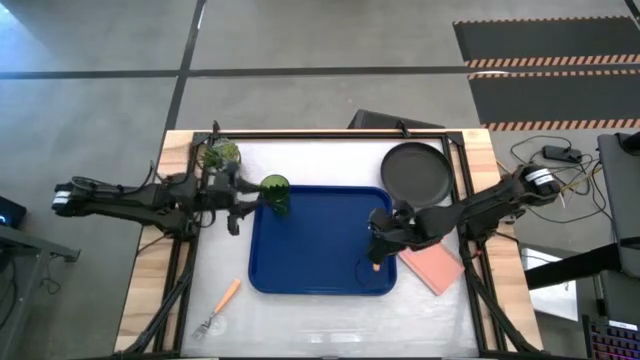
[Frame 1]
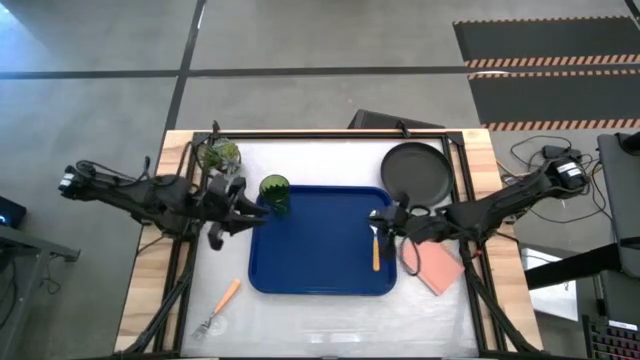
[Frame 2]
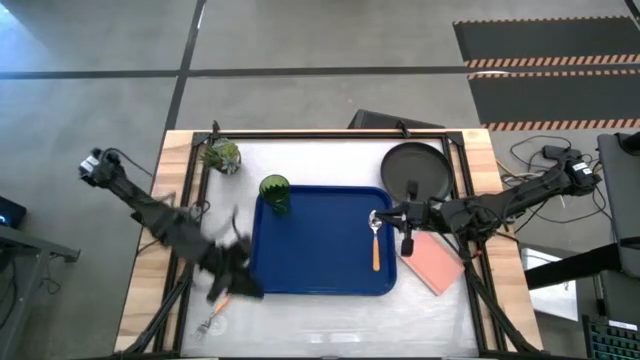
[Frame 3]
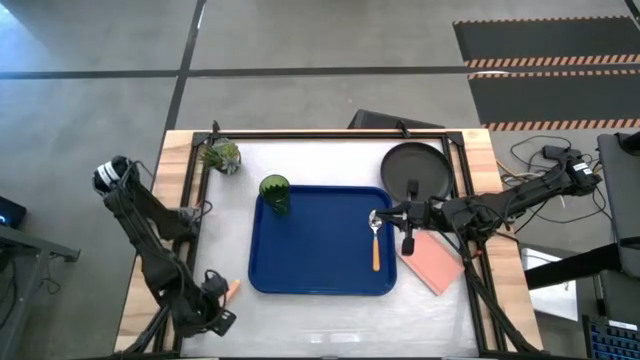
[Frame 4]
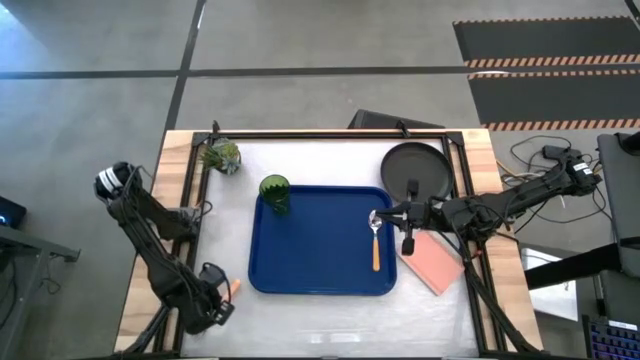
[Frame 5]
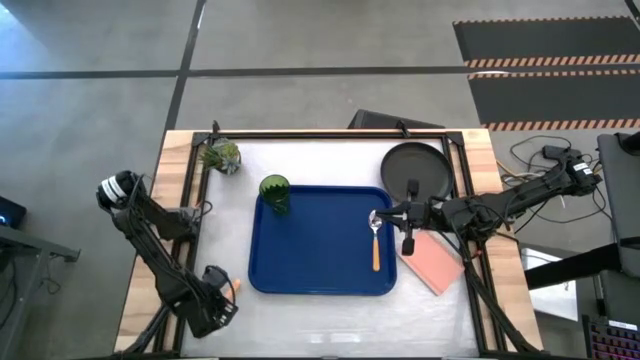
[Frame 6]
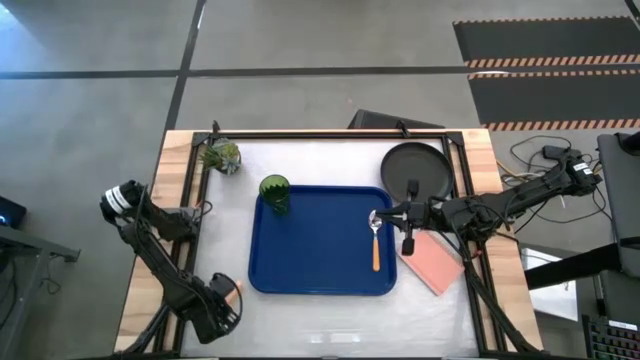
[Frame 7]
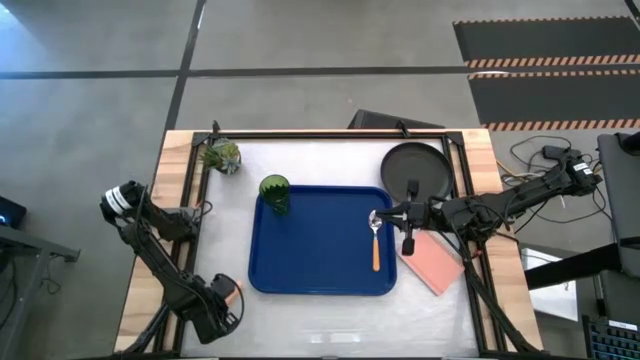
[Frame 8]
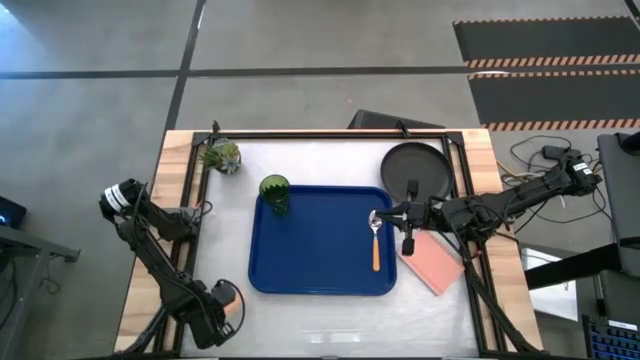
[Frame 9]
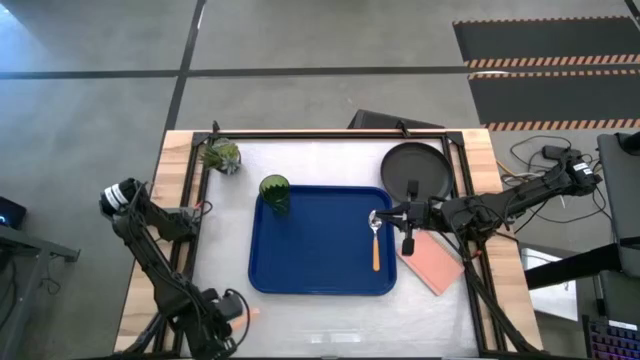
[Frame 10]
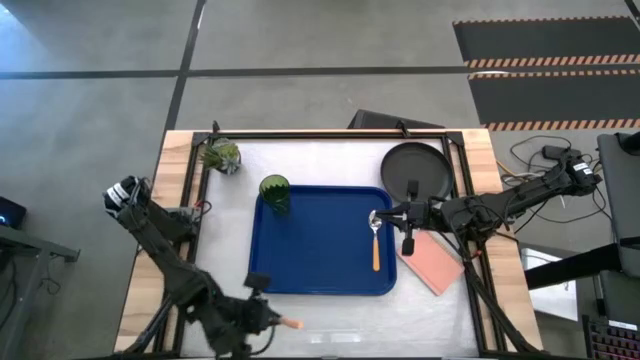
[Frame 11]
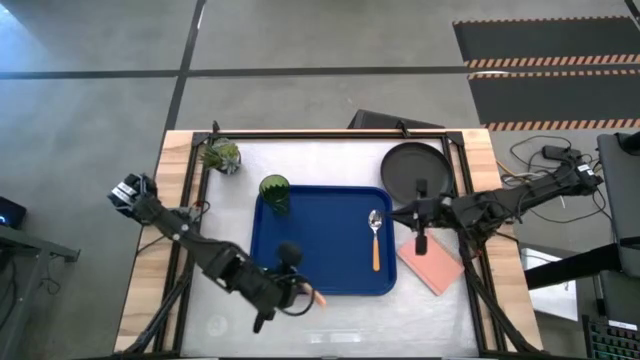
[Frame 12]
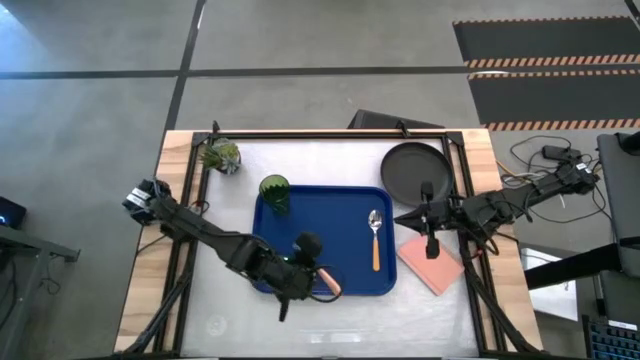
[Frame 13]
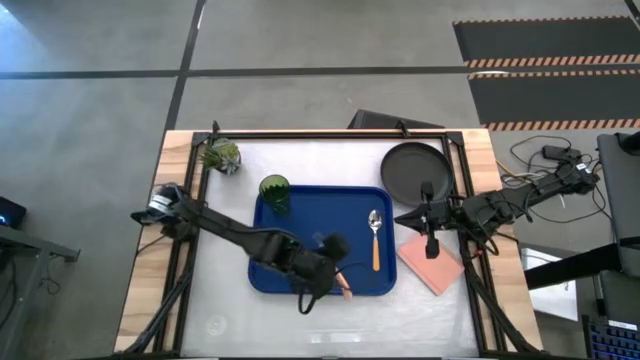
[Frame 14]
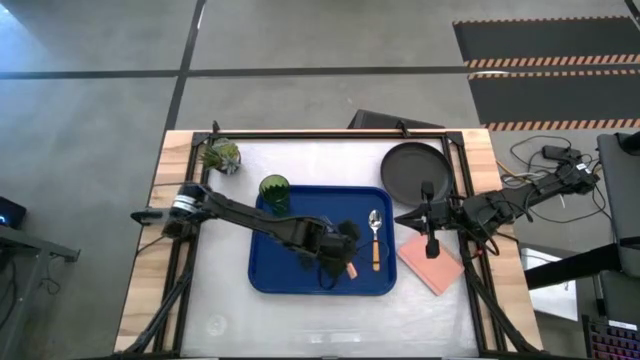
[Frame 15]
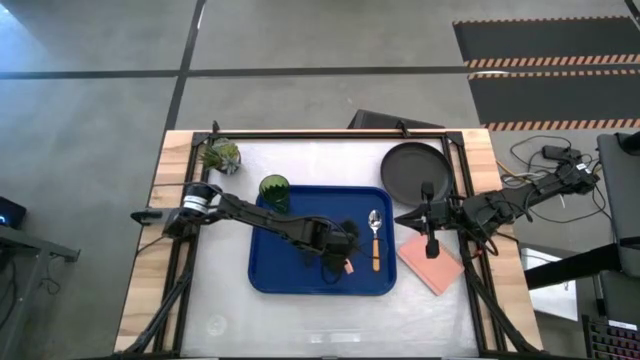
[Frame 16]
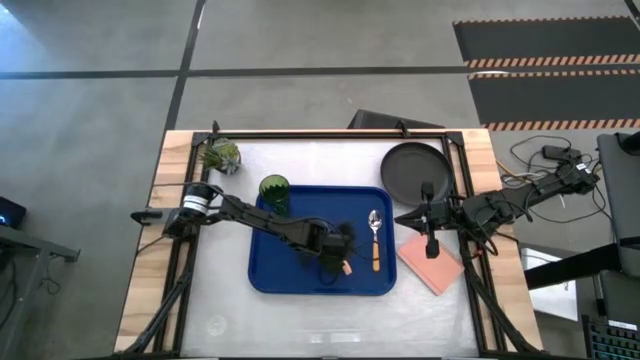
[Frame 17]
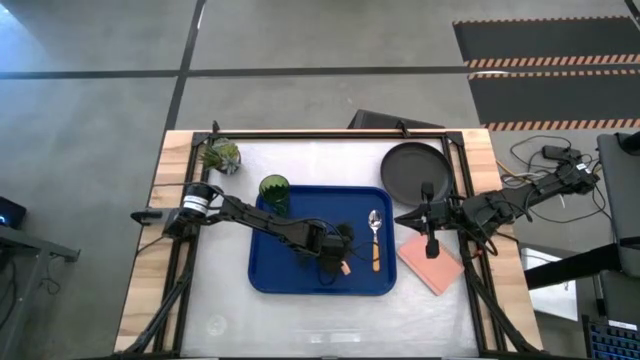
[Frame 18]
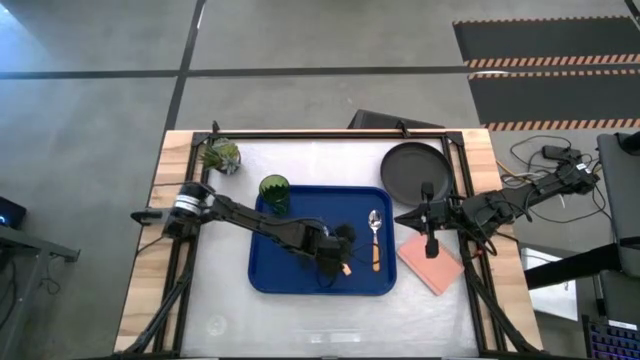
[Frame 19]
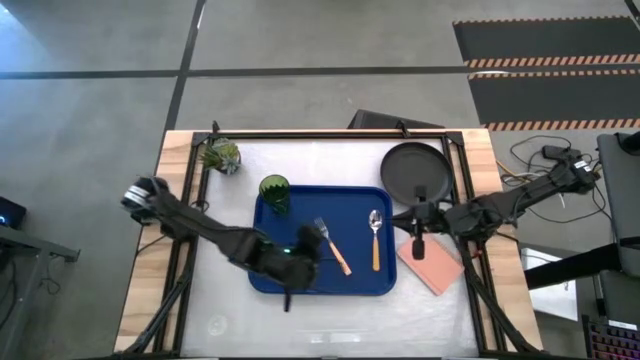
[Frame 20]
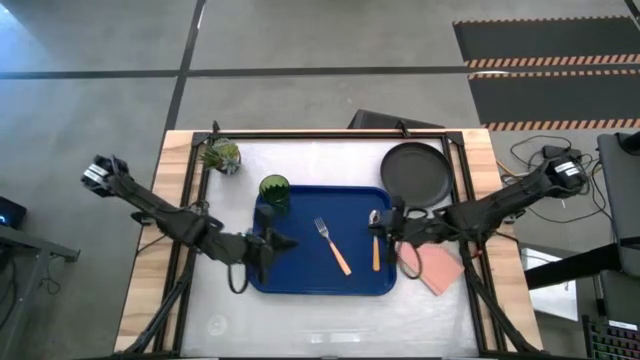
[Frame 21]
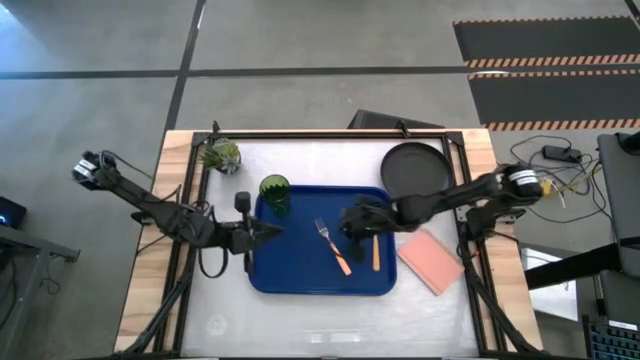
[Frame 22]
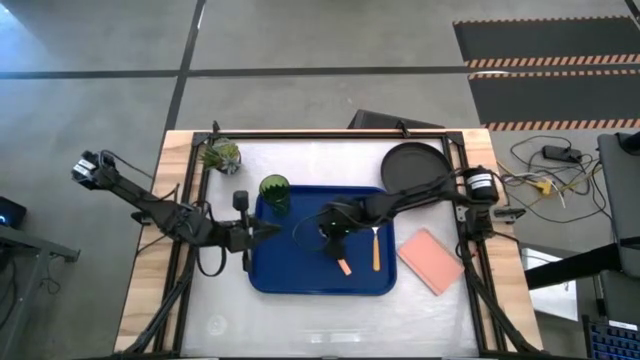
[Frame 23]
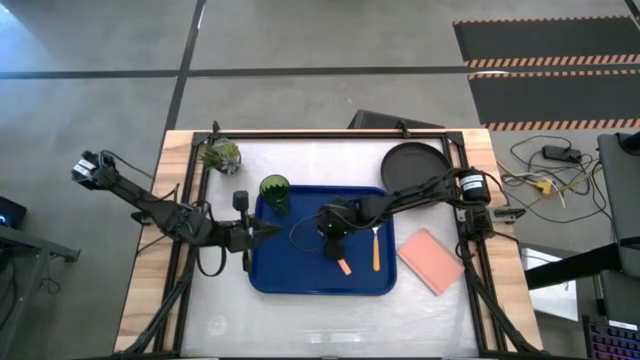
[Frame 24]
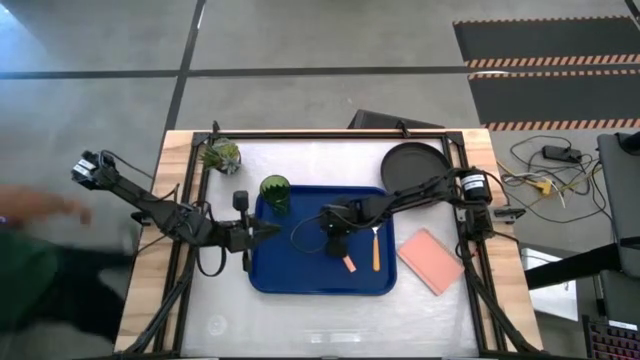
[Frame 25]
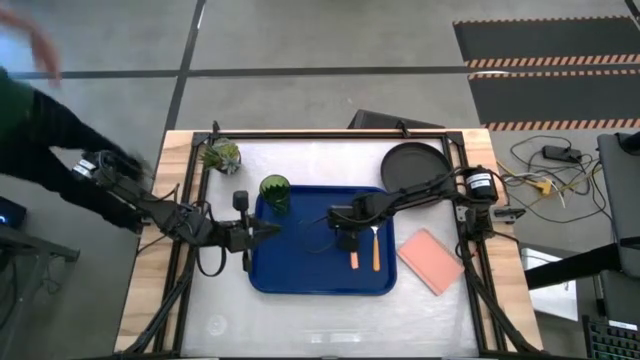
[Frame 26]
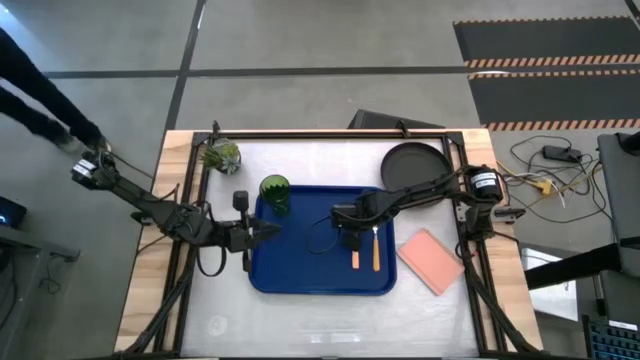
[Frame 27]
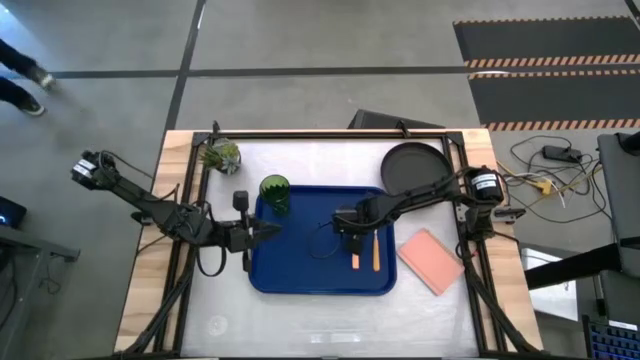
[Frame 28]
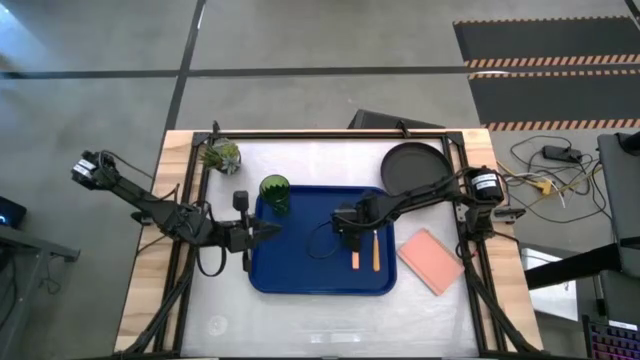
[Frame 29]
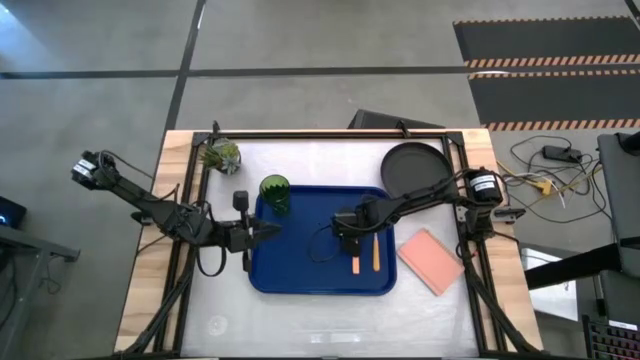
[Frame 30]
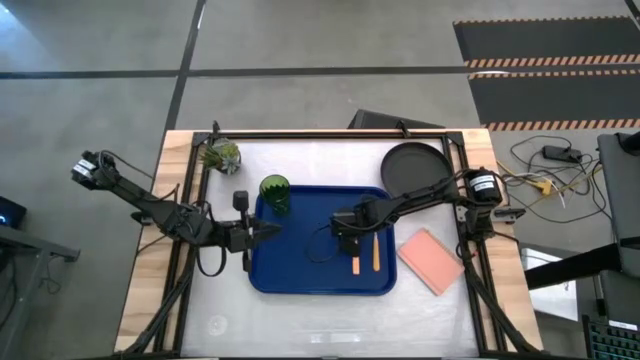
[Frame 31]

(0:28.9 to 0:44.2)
Task: Pick and place plate/cup/fork/spoon on tray
Put the fork on the blue tray

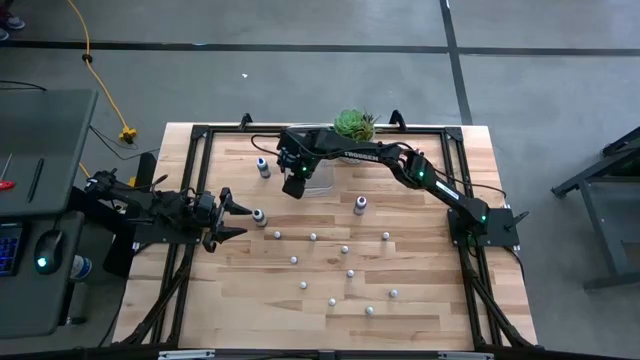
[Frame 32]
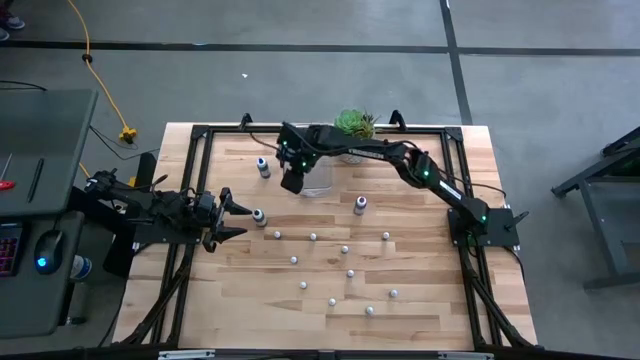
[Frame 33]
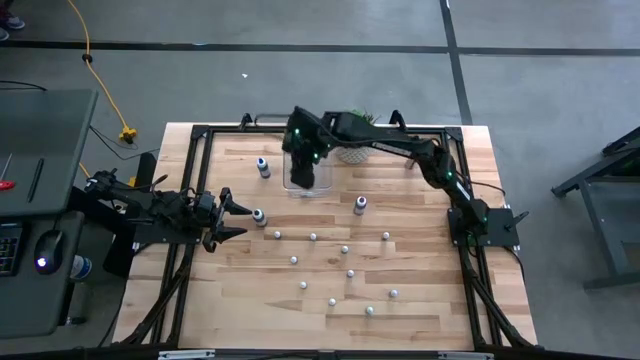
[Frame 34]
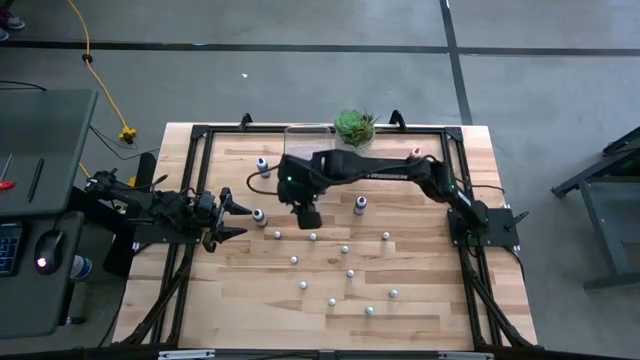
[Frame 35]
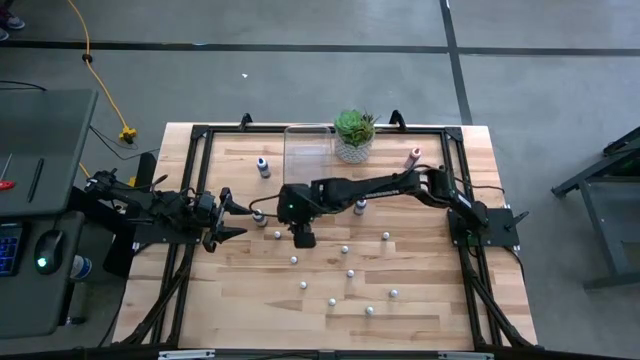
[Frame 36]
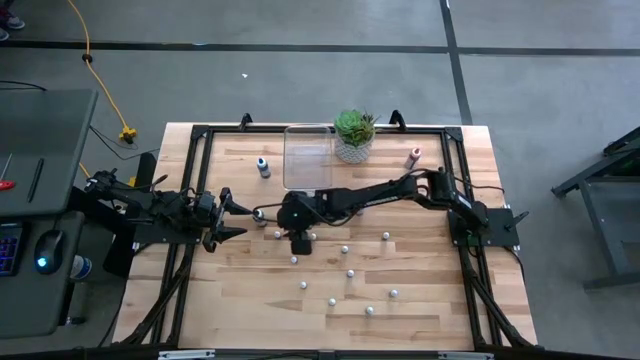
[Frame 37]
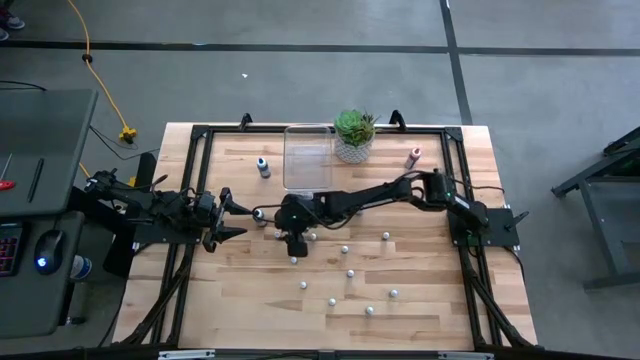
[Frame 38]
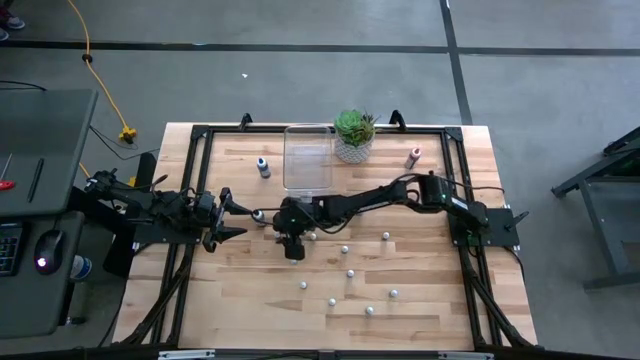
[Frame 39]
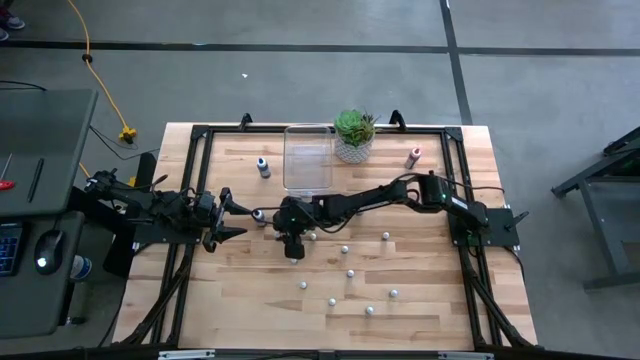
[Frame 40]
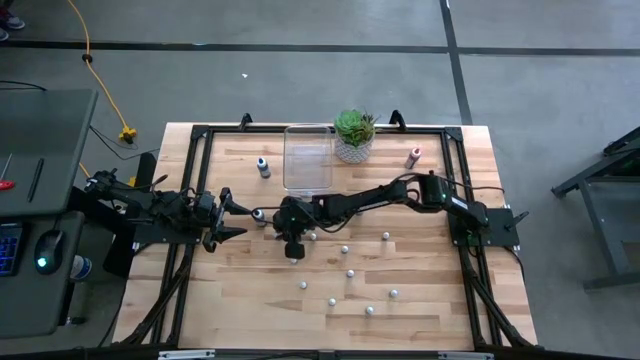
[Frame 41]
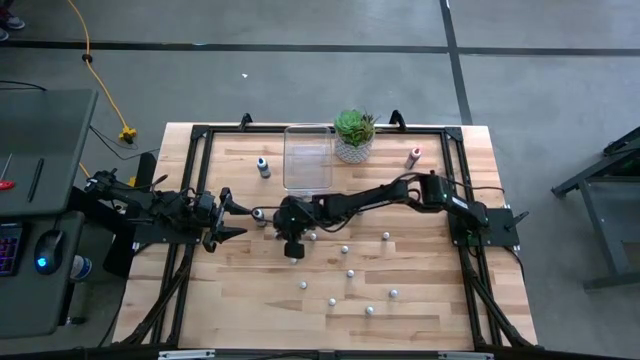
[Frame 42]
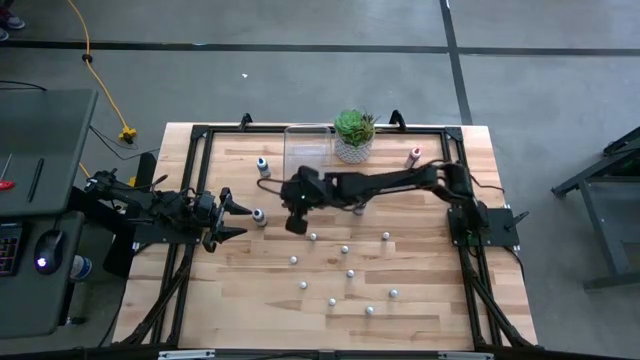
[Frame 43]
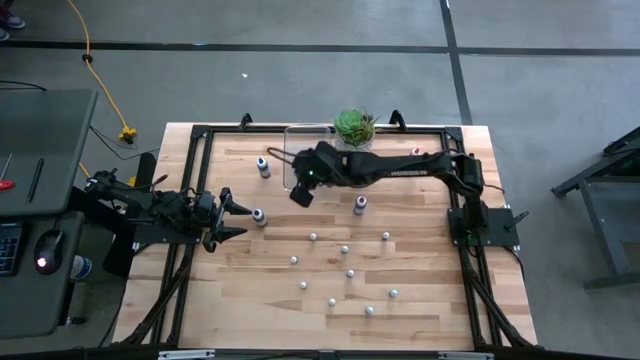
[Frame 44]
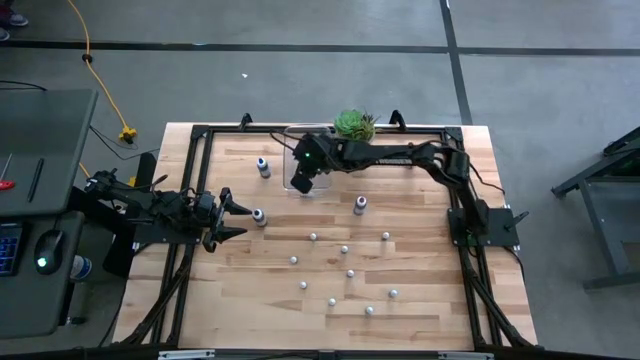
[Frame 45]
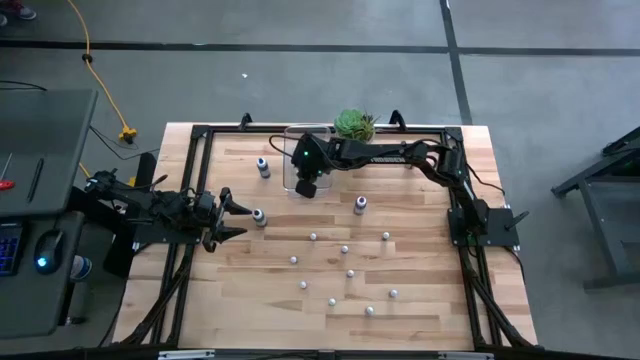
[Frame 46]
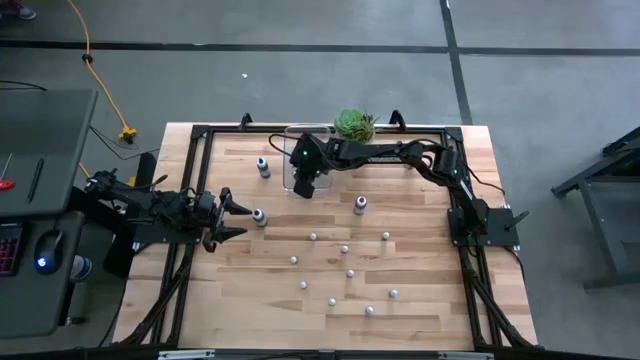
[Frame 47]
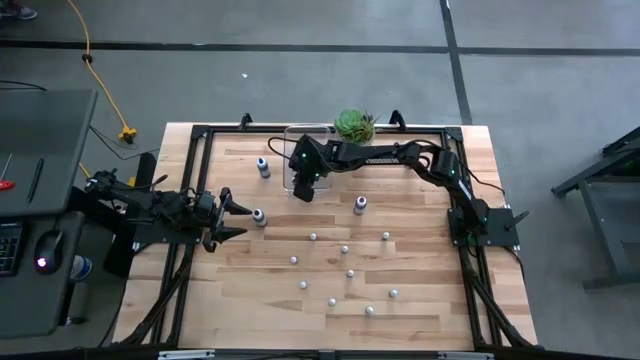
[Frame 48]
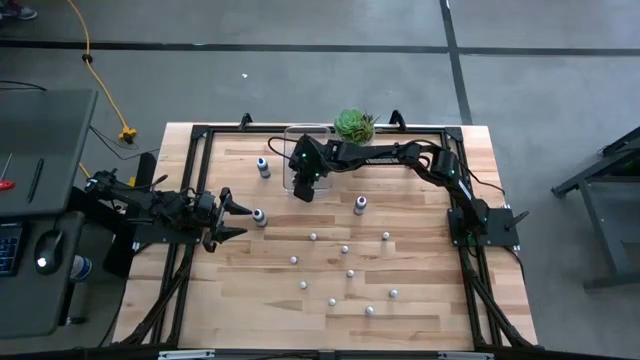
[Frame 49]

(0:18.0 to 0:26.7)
Task: Pick & Place food coloring
Put the small brown food coloring bottle into the transparent bin
